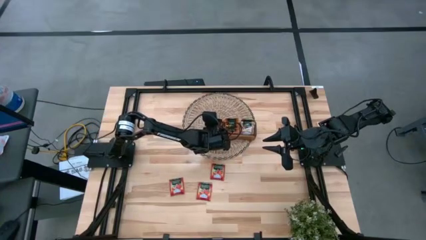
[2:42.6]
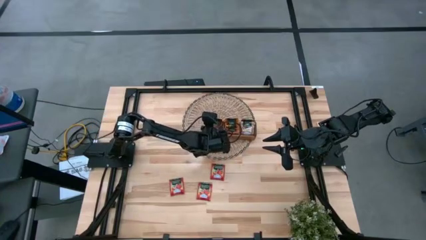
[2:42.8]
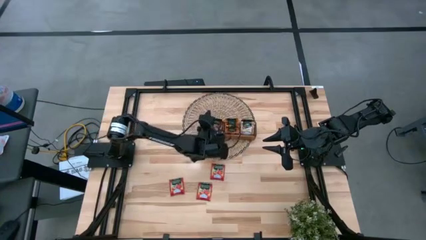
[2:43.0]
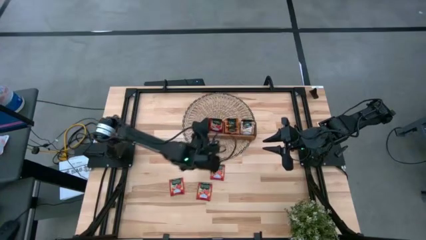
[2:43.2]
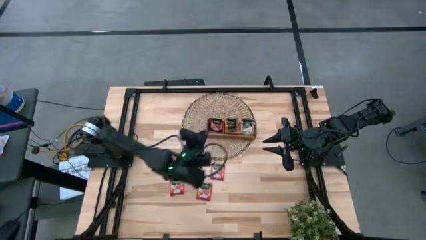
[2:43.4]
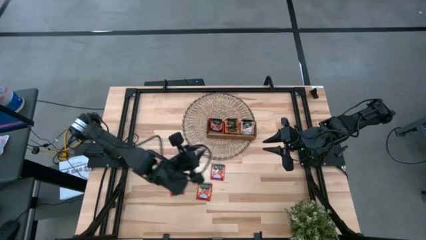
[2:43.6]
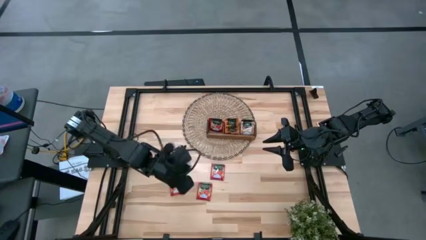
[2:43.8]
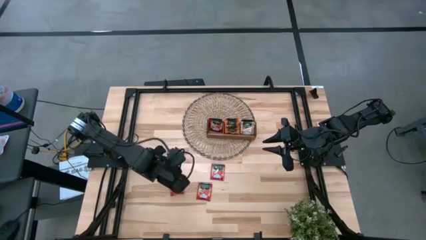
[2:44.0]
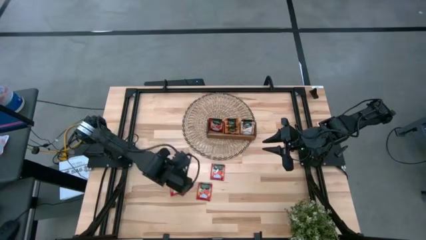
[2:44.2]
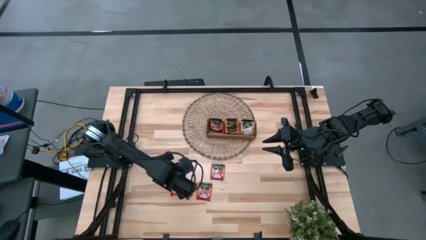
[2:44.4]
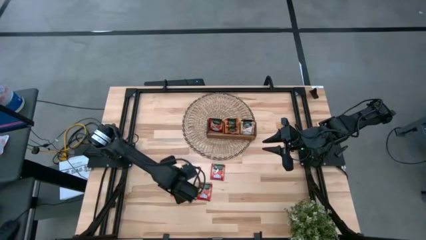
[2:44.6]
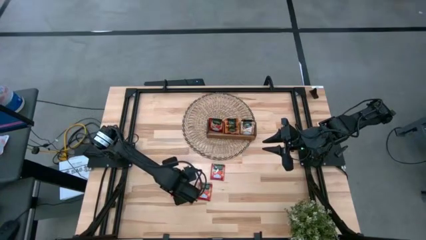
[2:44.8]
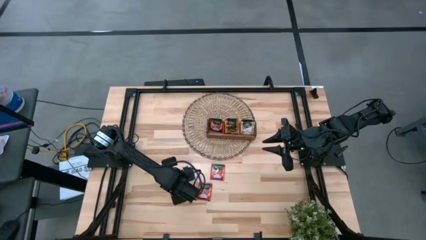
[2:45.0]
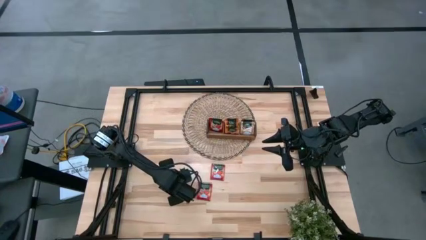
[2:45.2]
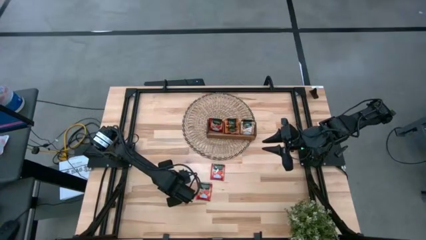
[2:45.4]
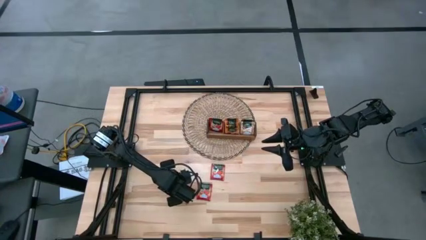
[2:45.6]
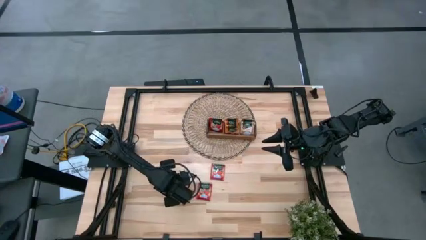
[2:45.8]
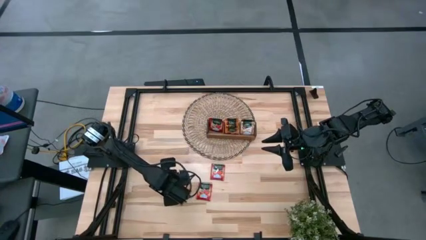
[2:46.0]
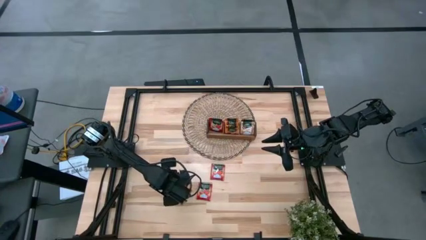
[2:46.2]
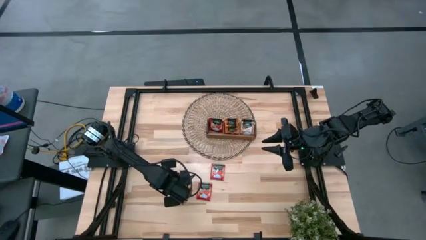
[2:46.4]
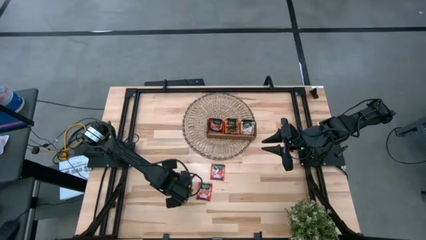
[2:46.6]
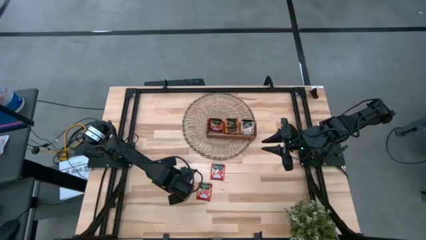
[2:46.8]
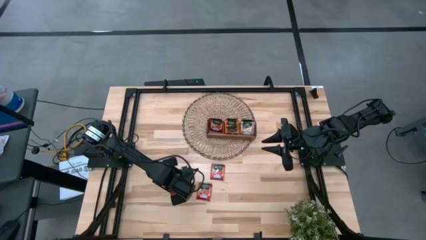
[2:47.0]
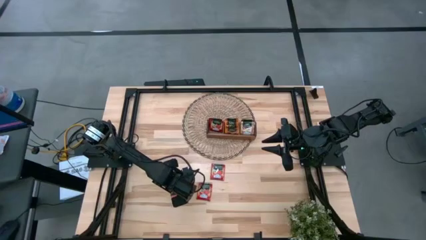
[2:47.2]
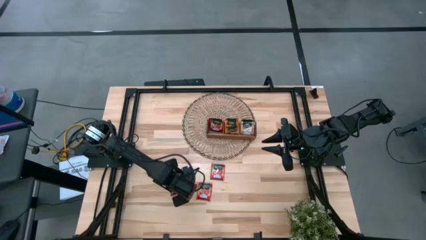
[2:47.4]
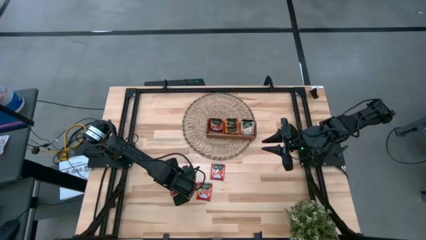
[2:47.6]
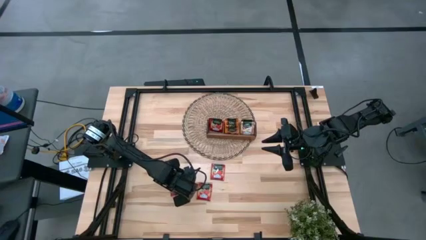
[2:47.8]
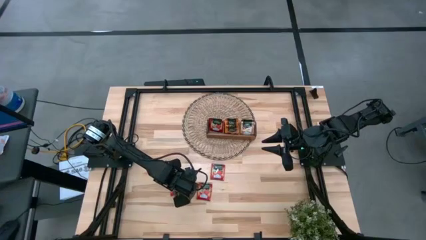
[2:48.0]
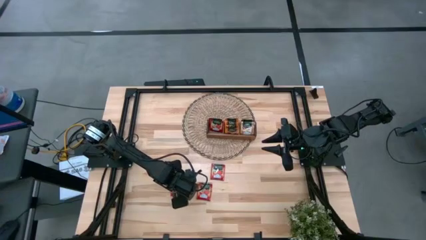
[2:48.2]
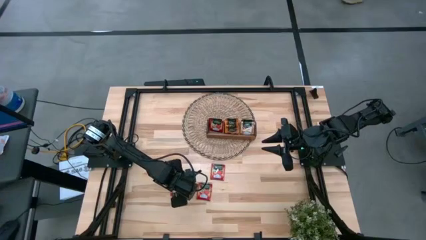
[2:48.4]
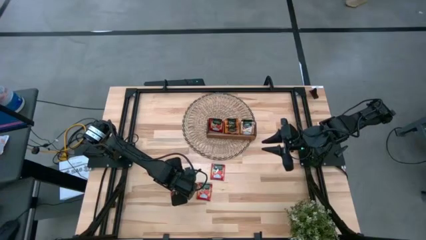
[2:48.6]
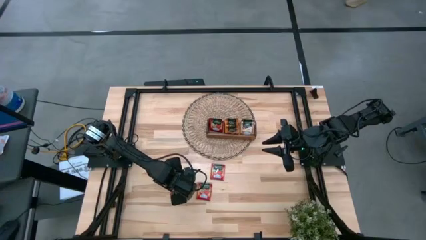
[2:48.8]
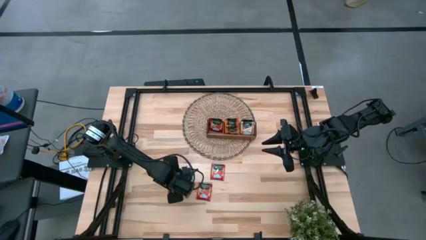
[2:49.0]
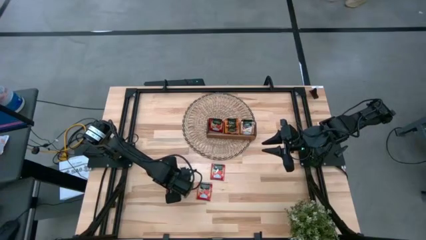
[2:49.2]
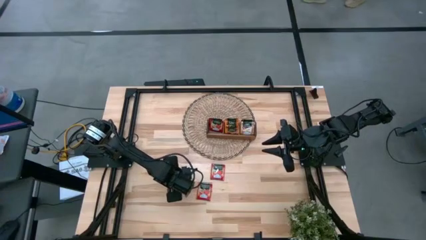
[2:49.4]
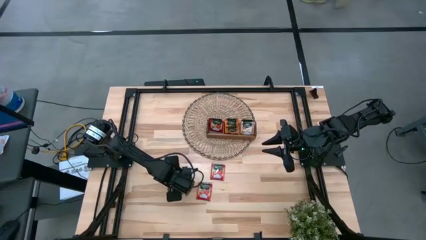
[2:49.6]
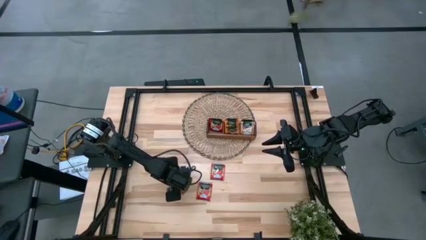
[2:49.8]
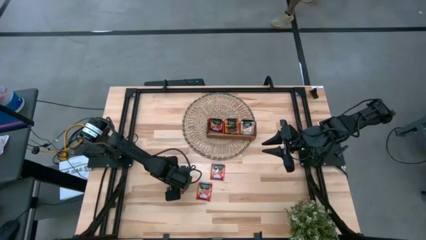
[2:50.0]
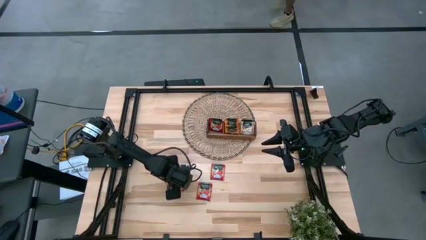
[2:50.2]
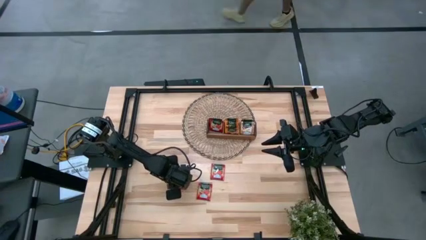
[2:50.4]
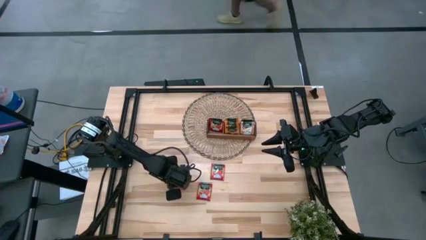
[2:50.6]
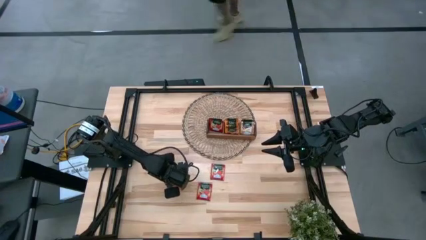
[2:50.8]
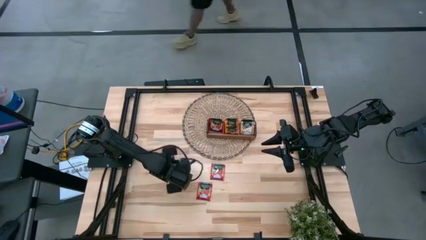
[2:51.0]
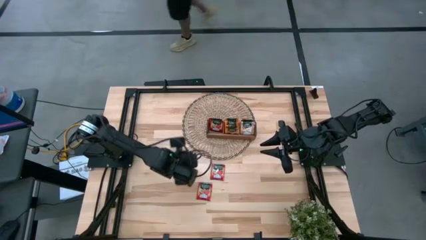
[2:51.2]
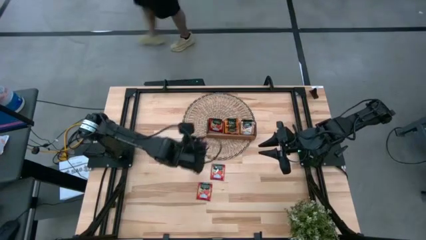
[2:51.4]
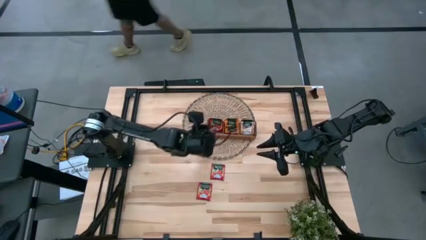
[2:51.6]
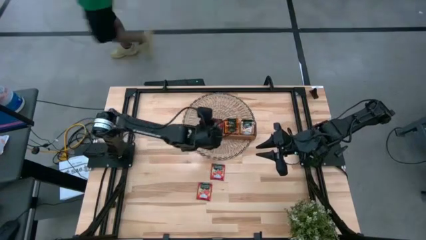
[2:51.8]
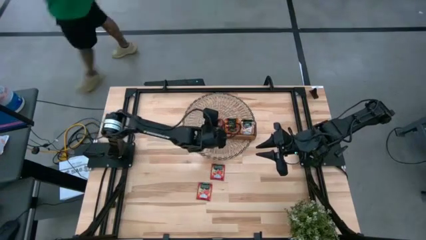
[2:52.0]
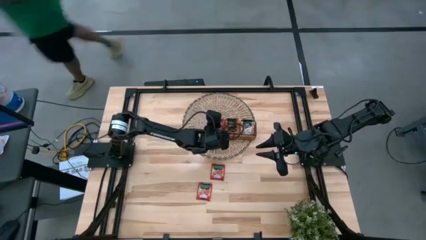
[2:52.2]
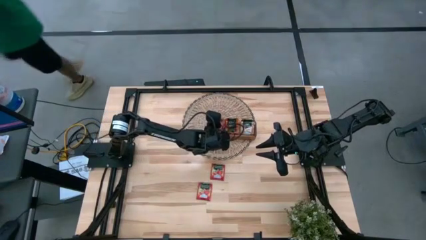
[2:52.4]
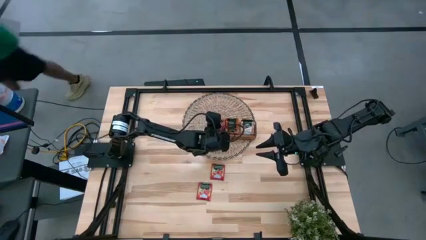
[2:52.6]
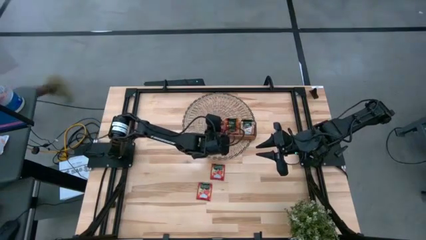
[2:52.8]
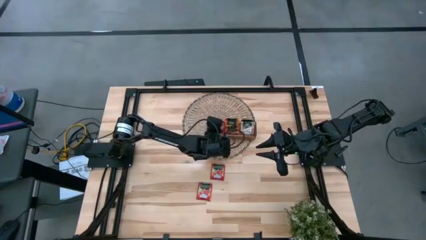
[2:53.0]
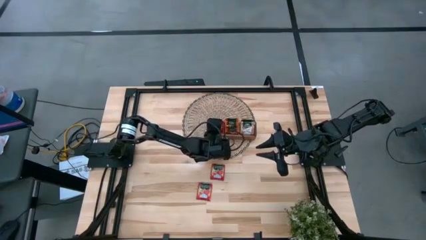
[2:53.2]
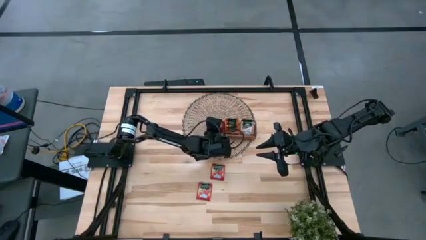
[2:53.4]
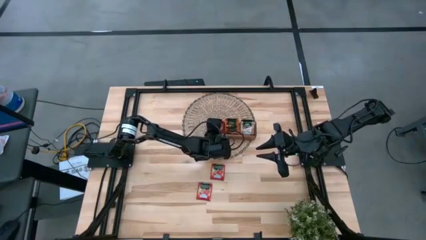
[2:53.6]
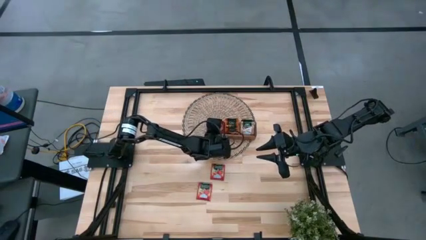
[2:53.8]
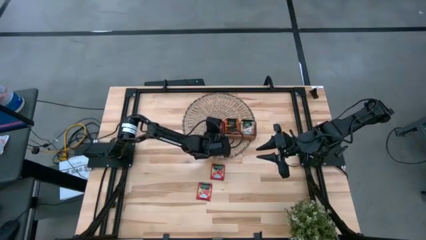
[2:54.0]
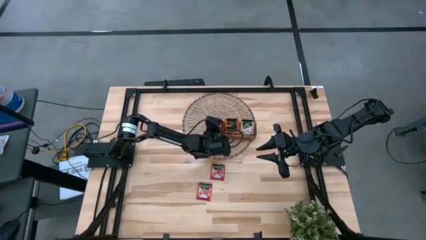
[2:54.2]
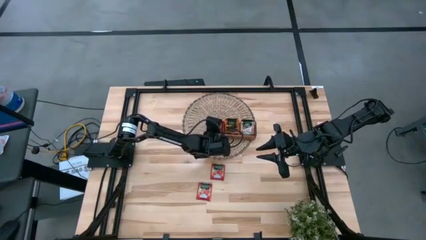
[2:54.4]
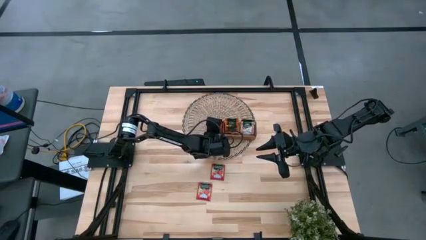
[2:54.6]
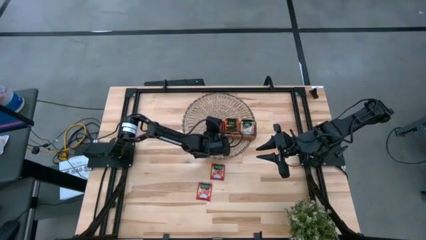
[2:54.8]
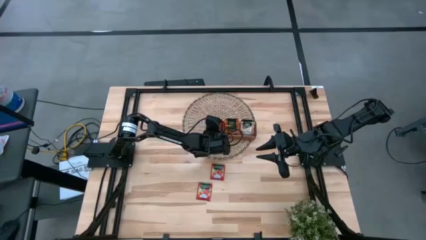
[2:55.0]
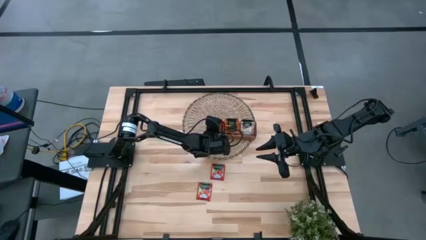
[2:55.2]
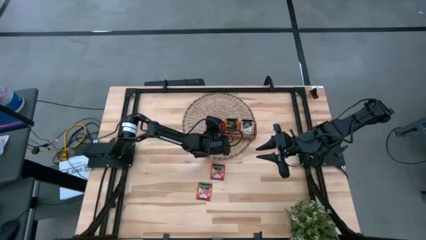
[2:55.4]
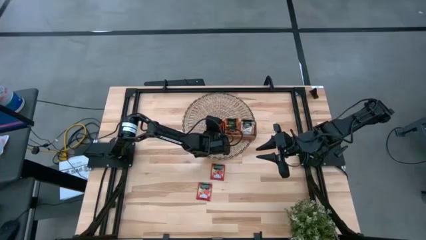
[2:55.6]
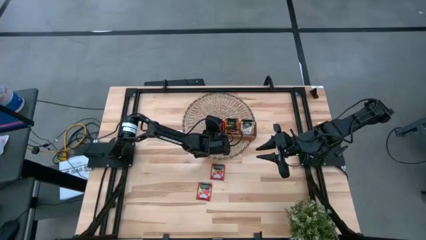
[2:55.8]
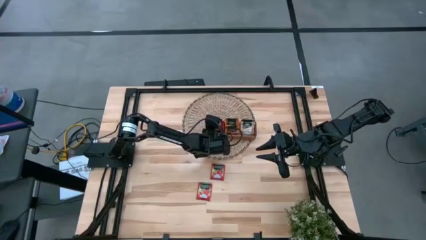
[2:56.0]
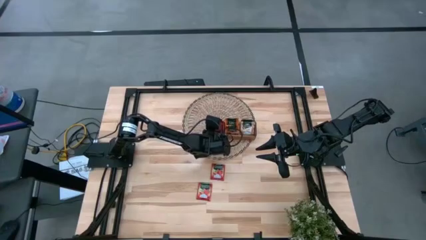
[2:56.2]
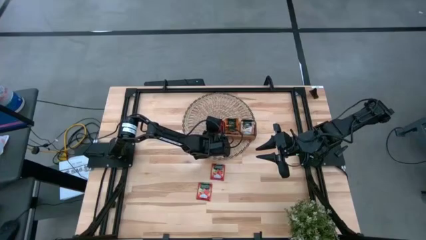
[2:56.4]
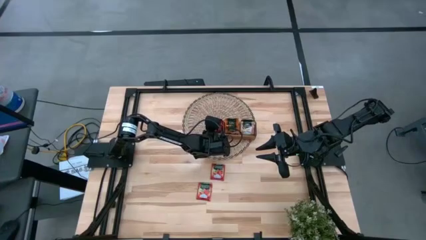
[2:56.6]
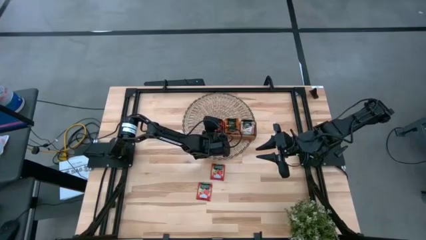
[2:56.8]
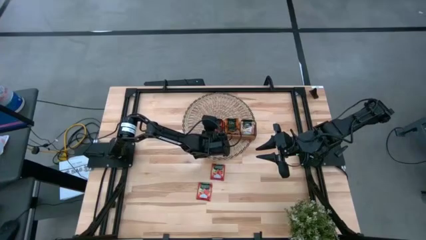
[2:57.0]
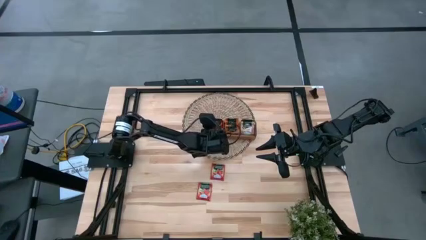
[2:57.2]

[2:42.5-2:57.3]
Task: Pick & Place Tea
Put the left red tea bag into the left slot of the wooden organizer
